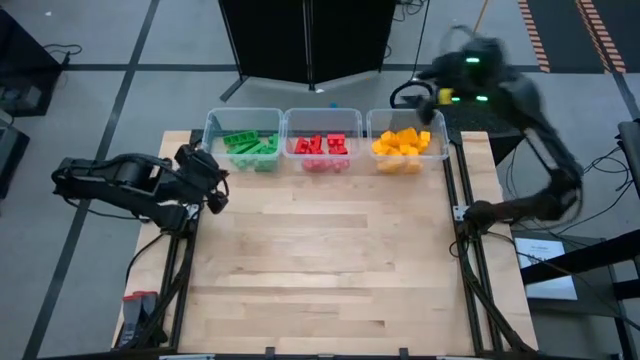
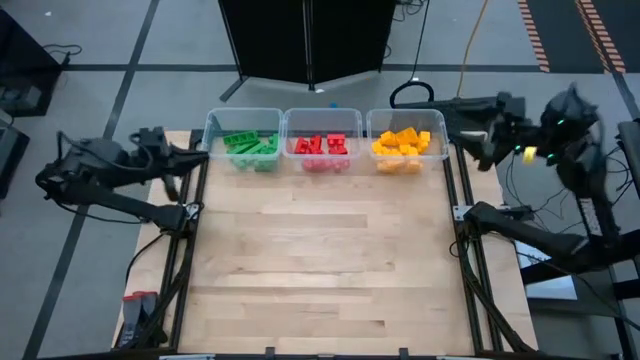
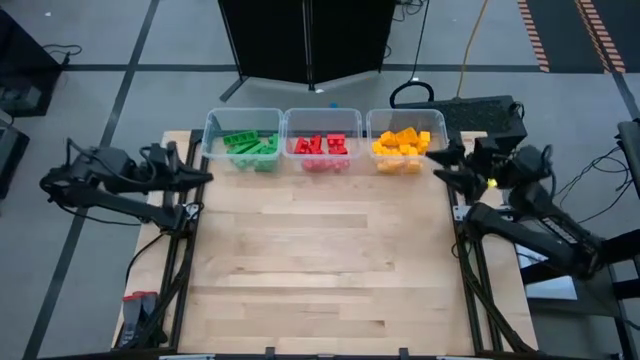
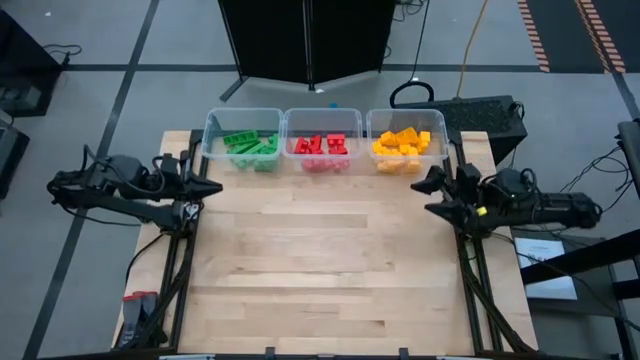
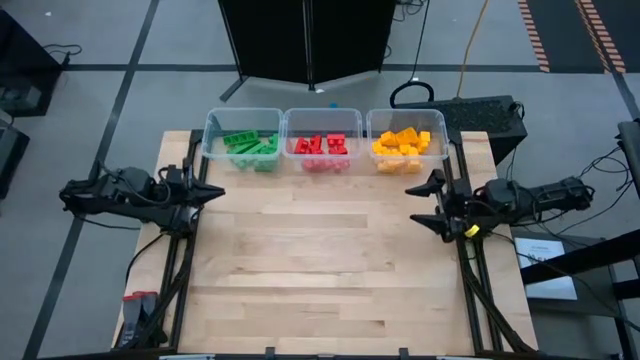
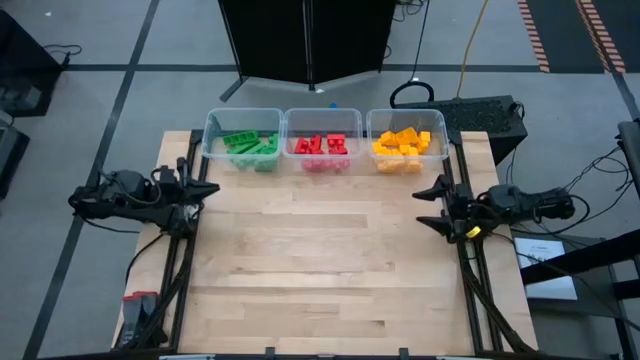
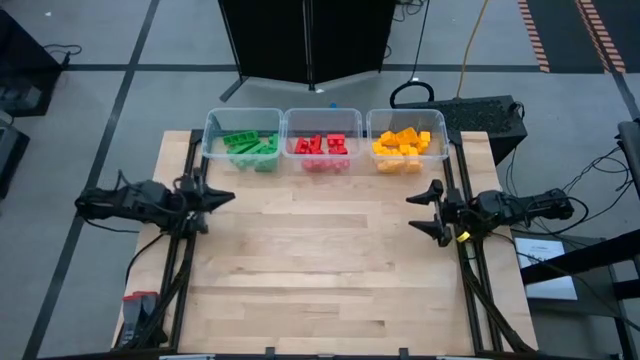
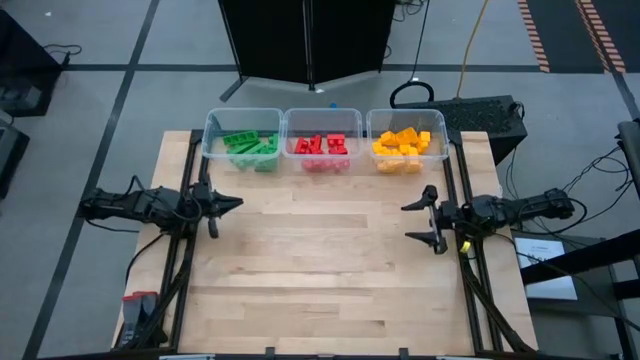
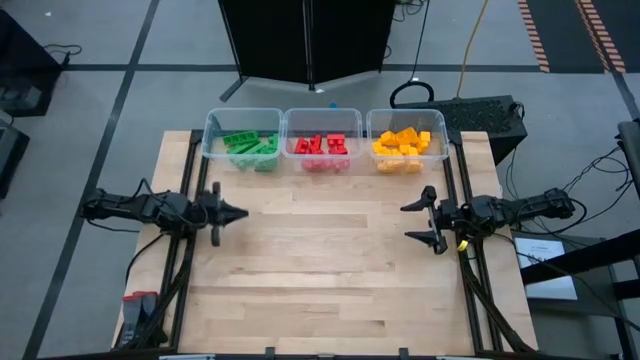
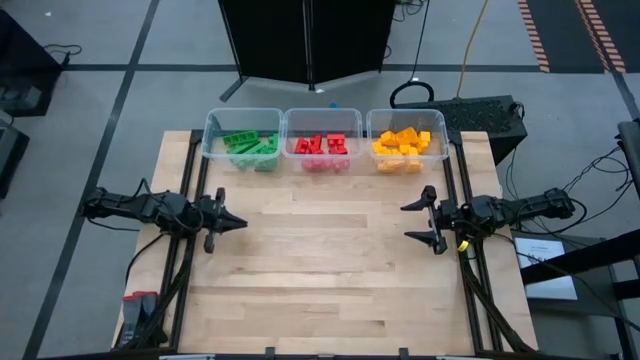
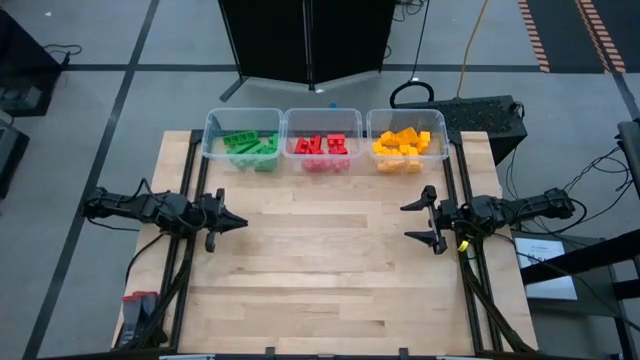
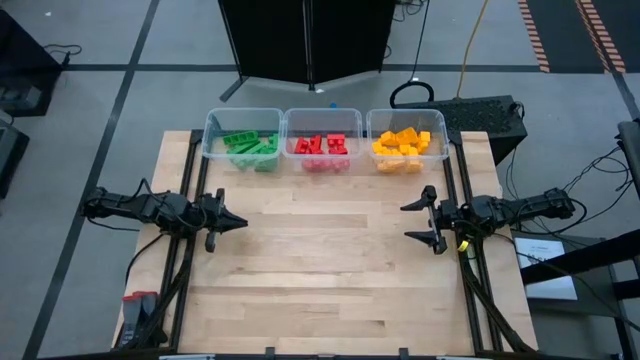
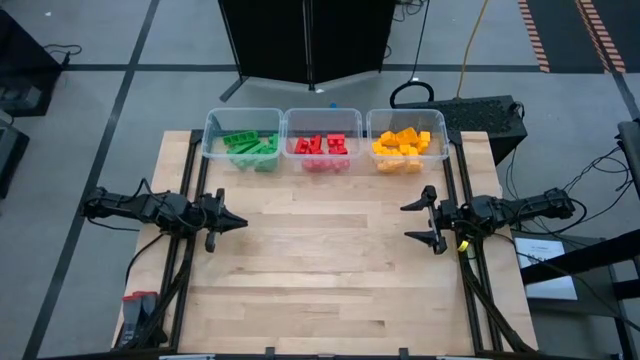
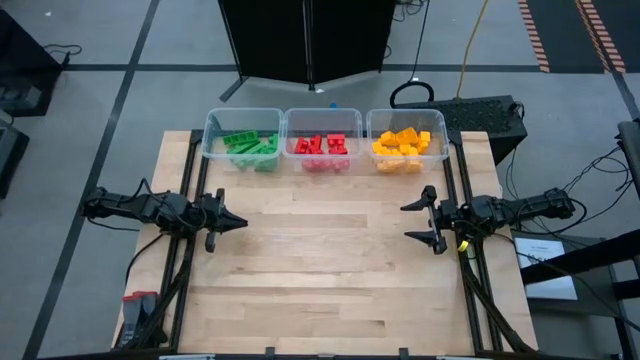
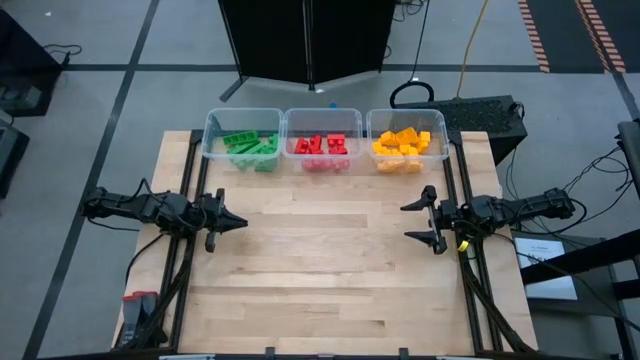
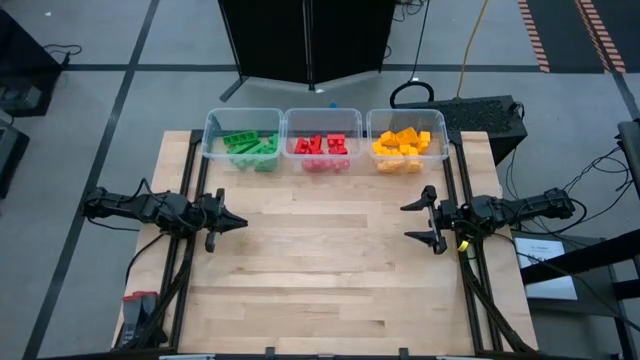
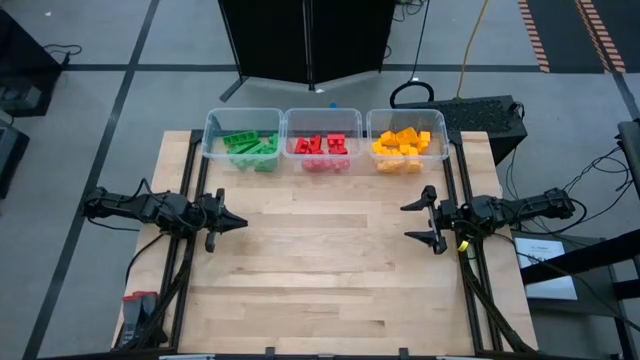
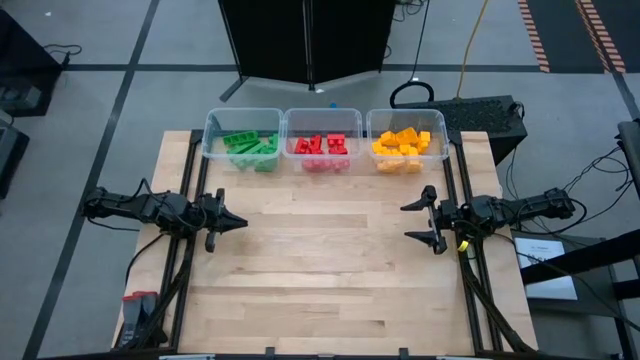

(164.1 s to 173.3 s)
Task: Sort blocks
Return to Home Position

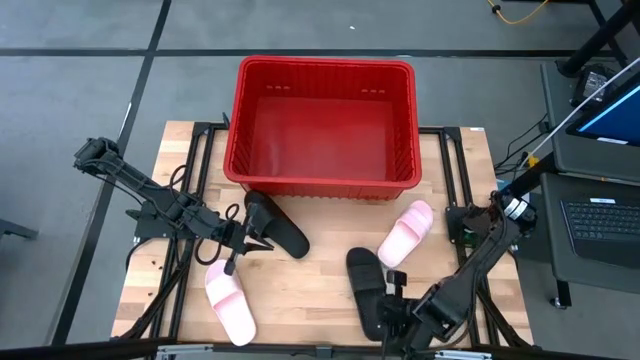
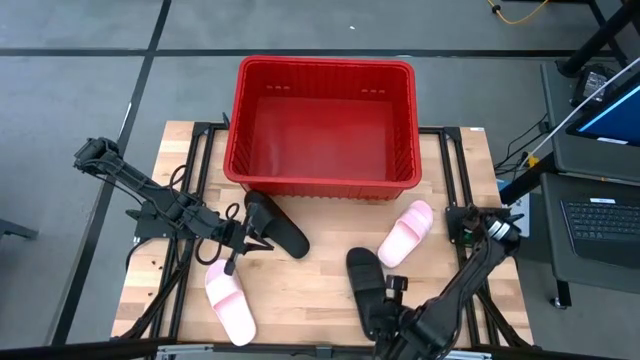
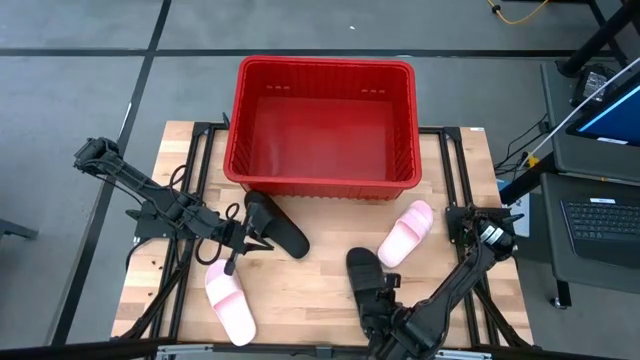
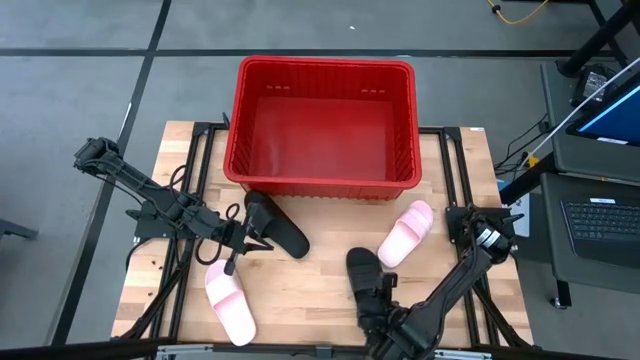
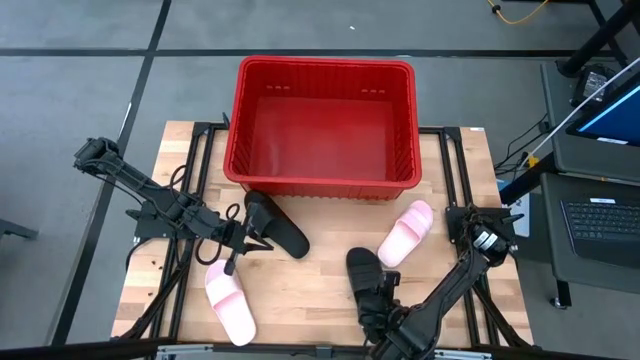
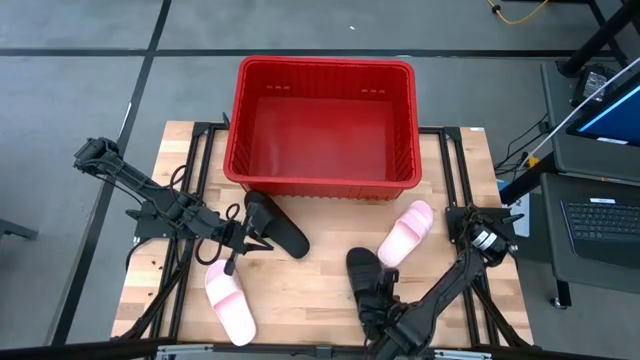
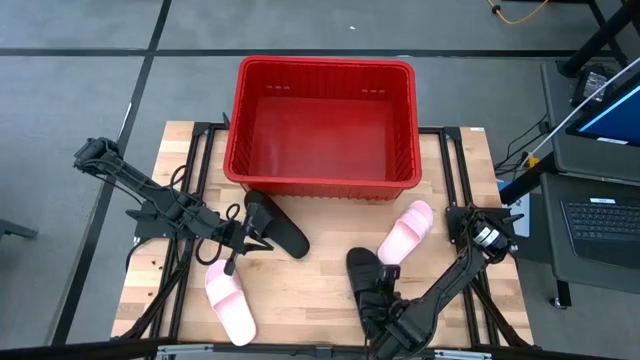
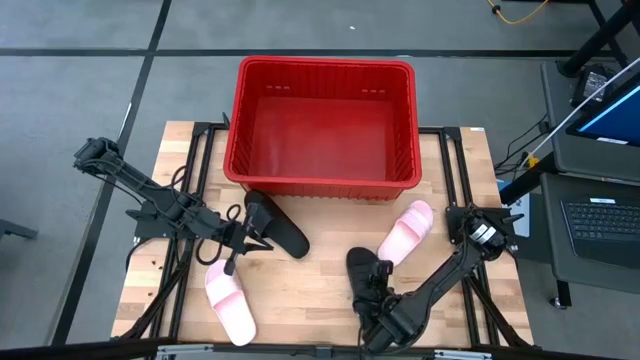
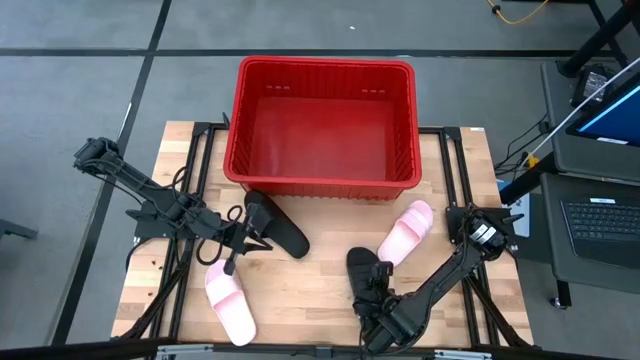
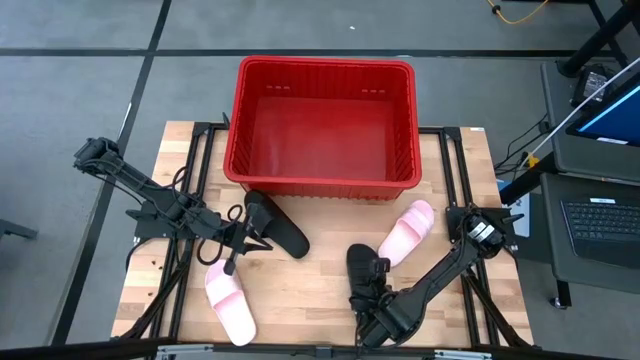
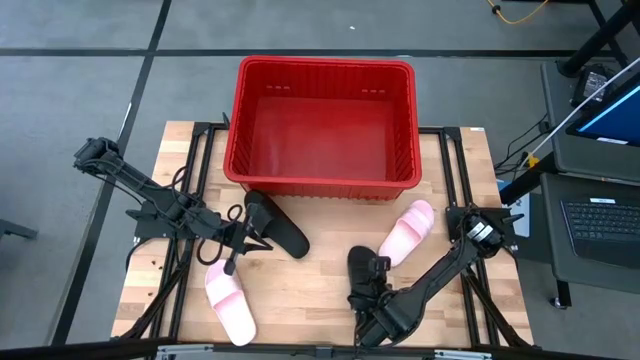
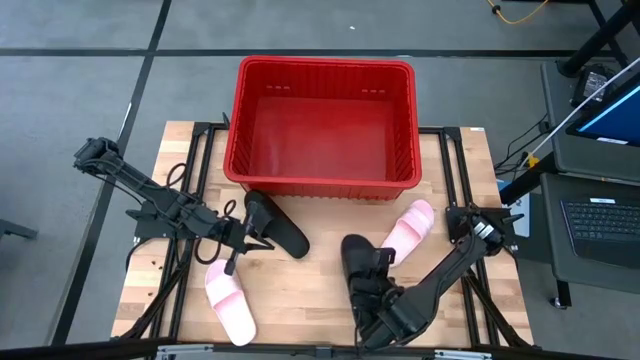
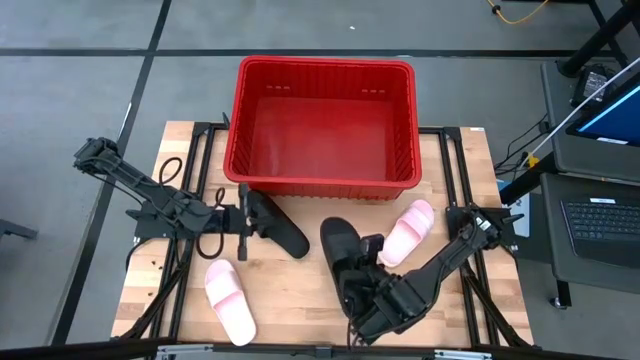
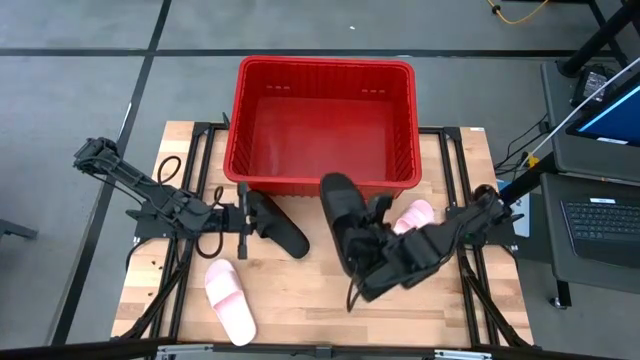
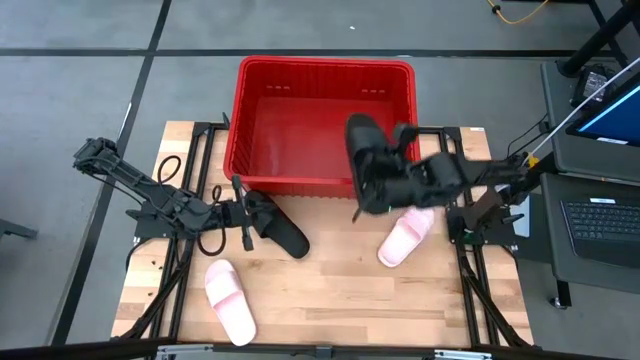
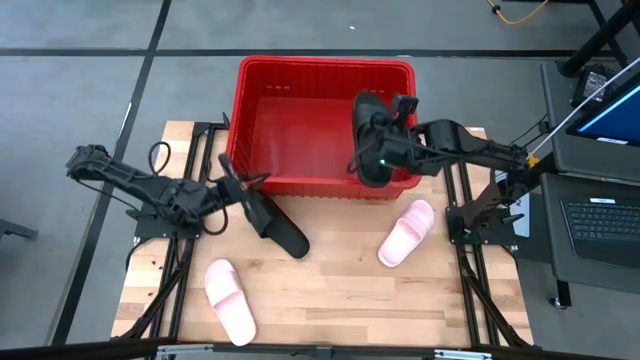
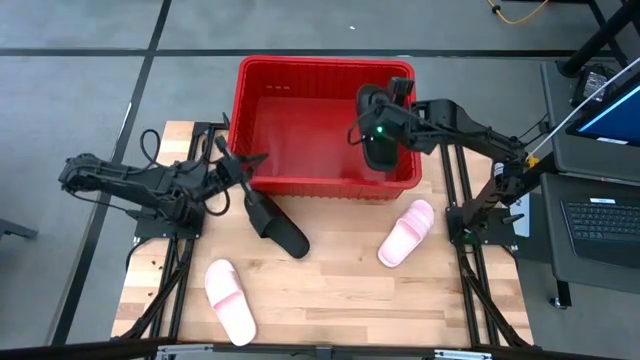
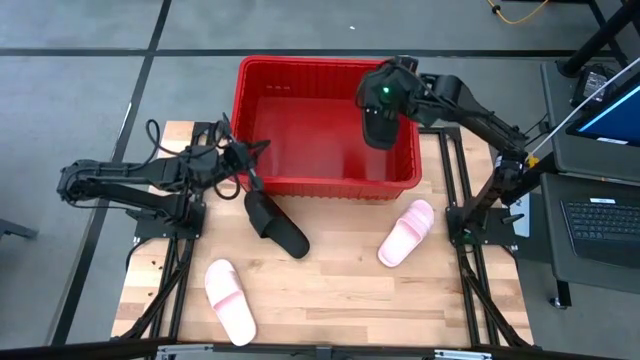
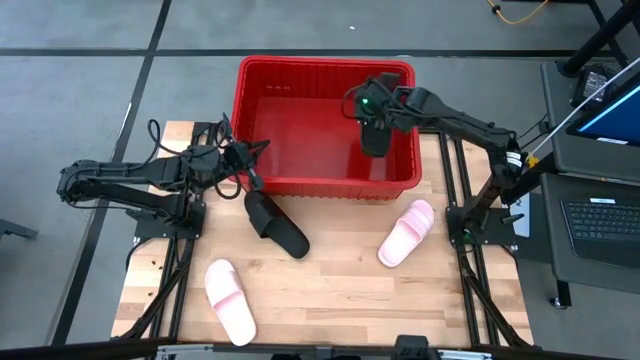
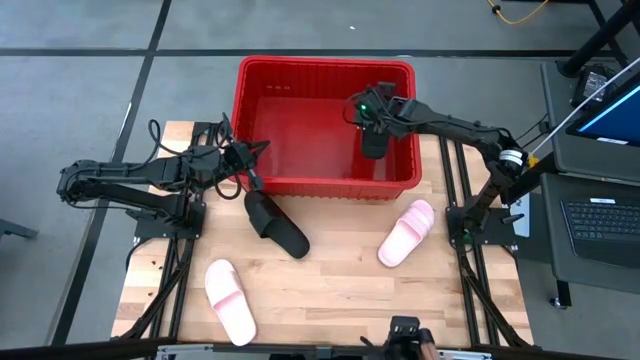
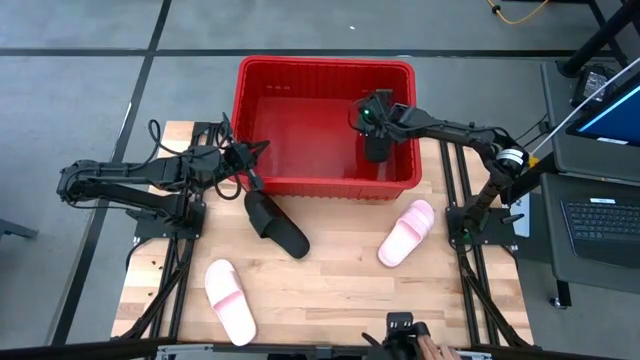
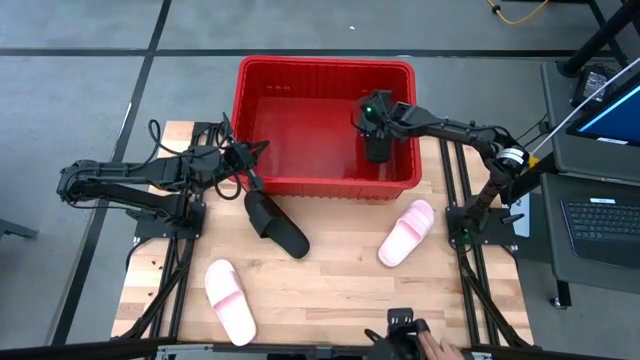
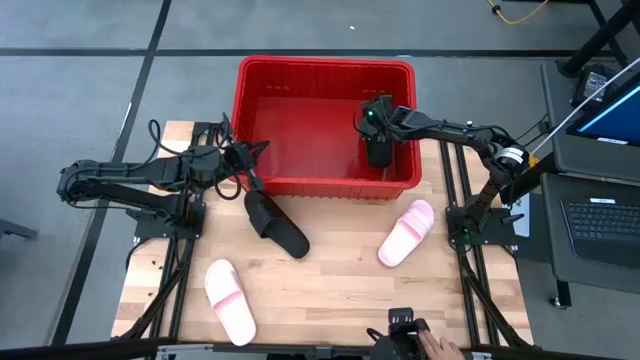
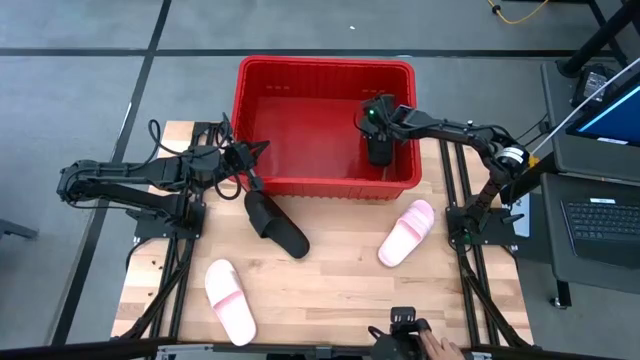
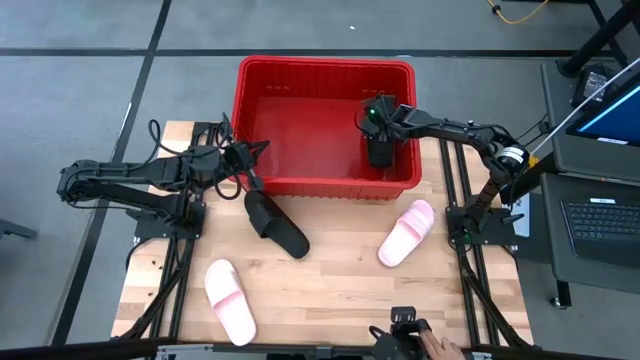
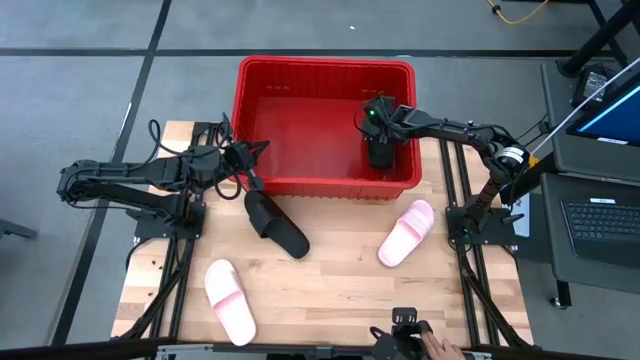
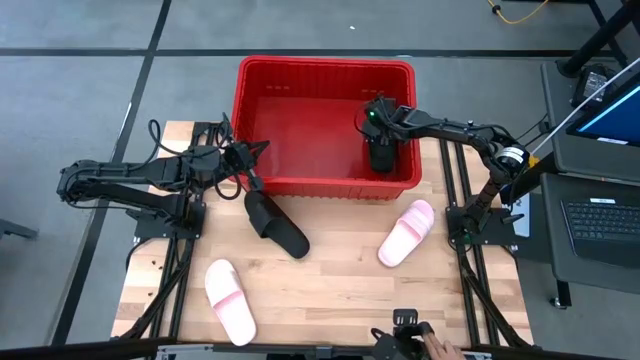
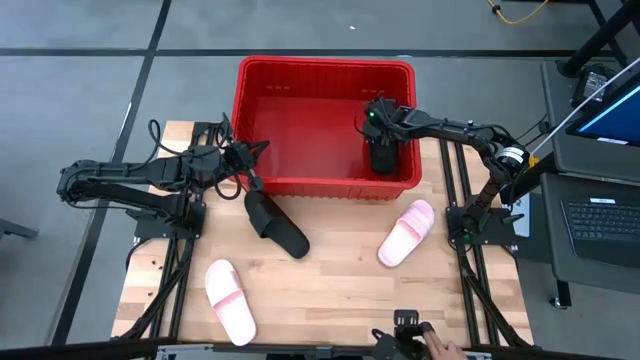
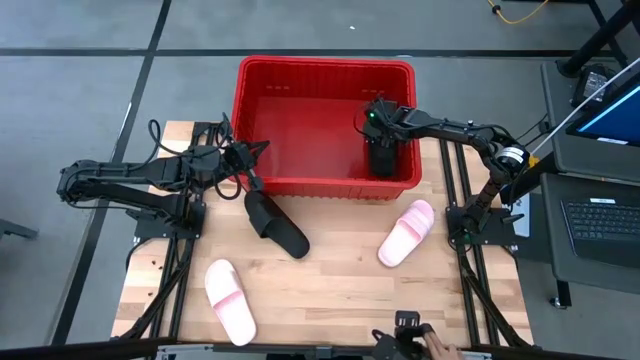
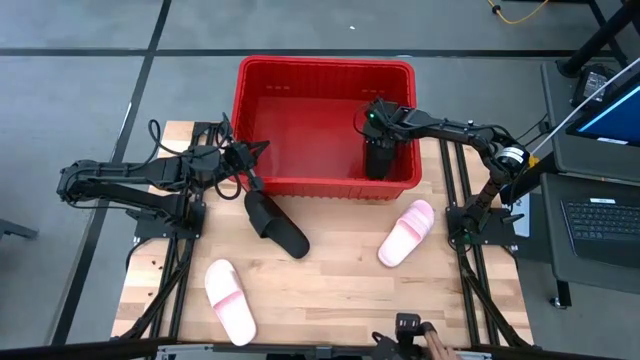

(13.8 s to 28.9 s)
Task: Pick and place slides into bin
Put the right black slide into the red bin
